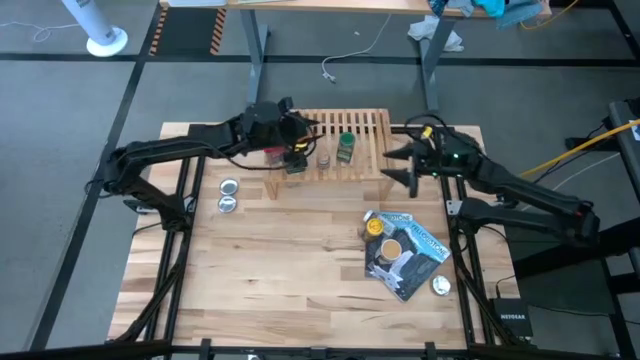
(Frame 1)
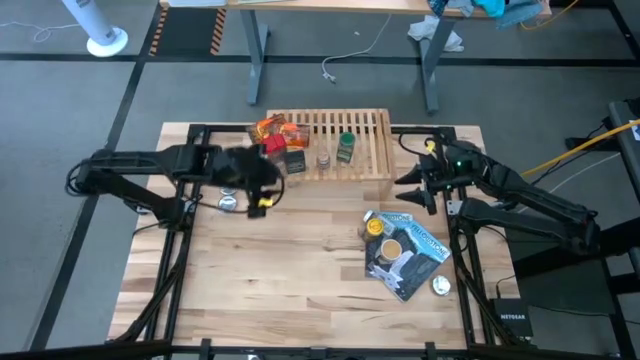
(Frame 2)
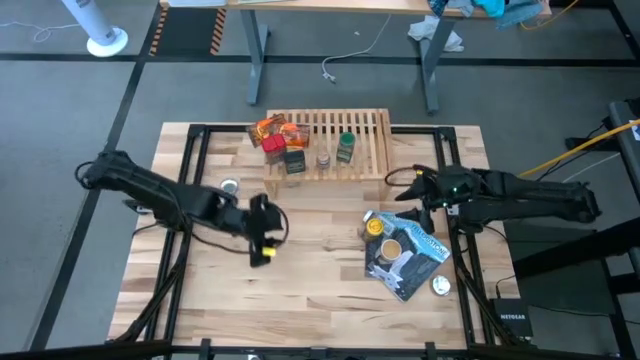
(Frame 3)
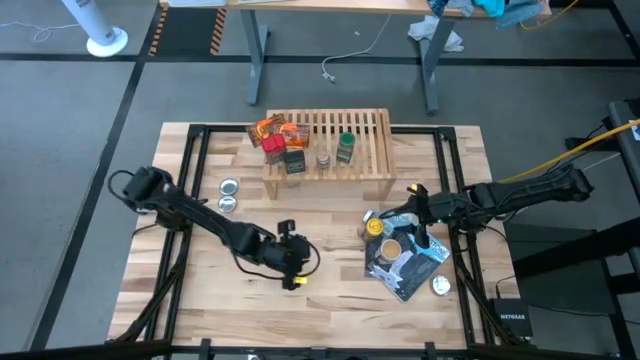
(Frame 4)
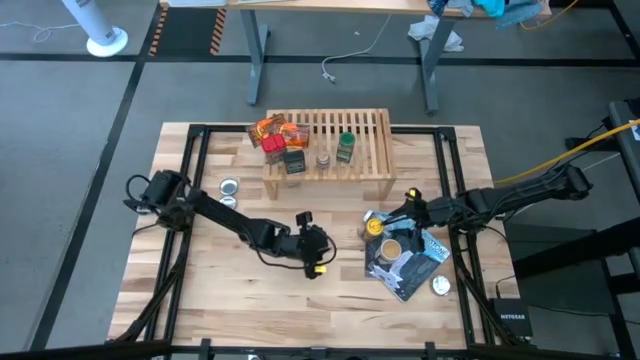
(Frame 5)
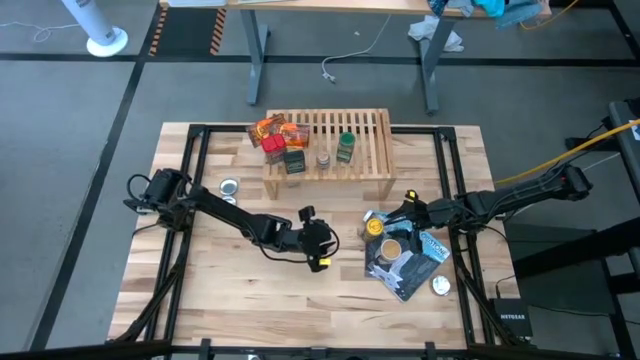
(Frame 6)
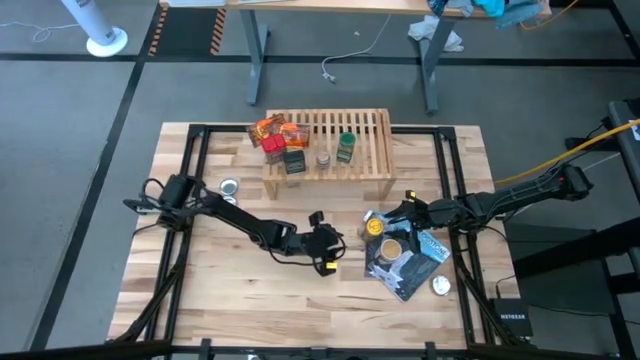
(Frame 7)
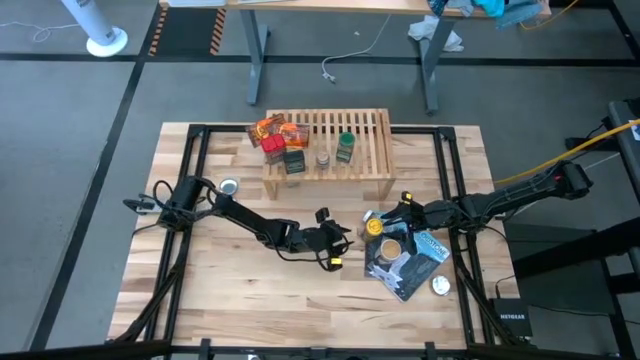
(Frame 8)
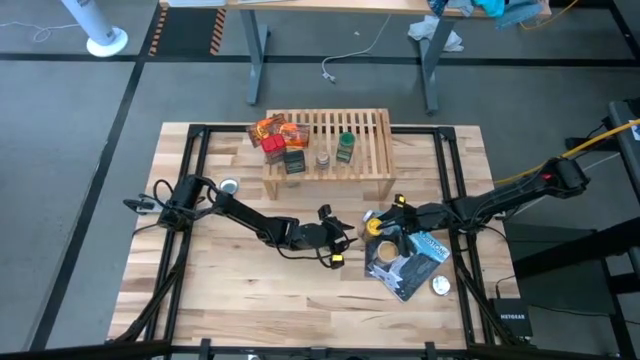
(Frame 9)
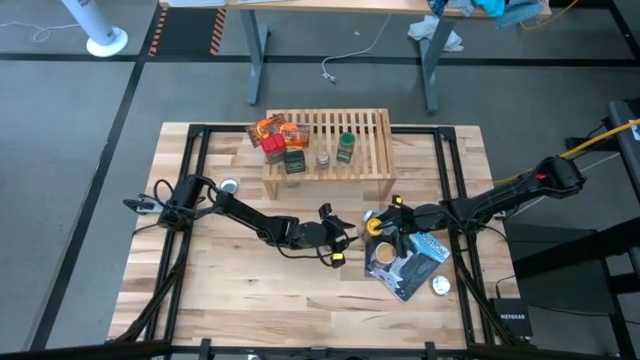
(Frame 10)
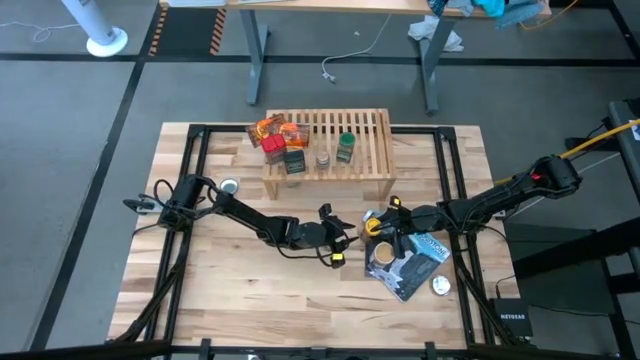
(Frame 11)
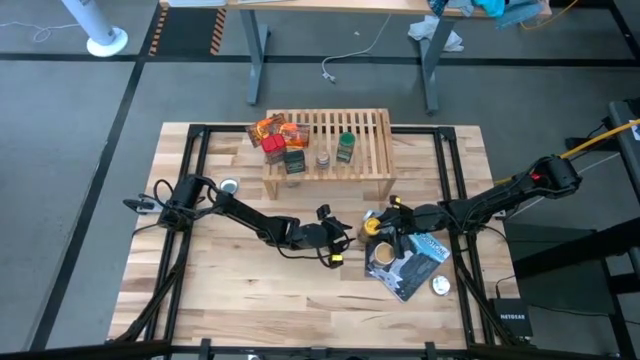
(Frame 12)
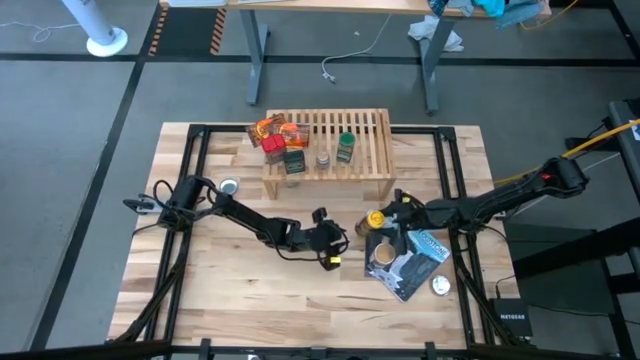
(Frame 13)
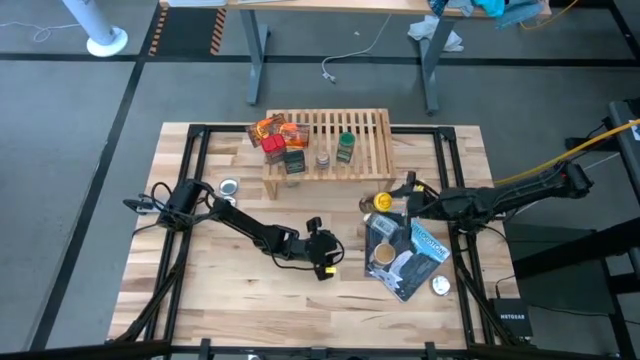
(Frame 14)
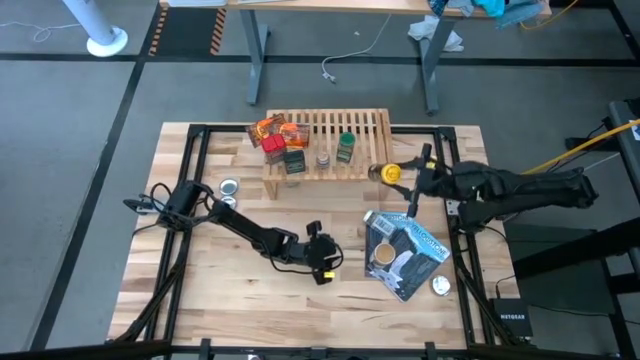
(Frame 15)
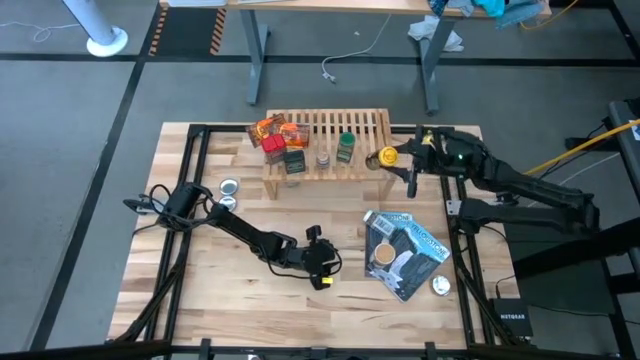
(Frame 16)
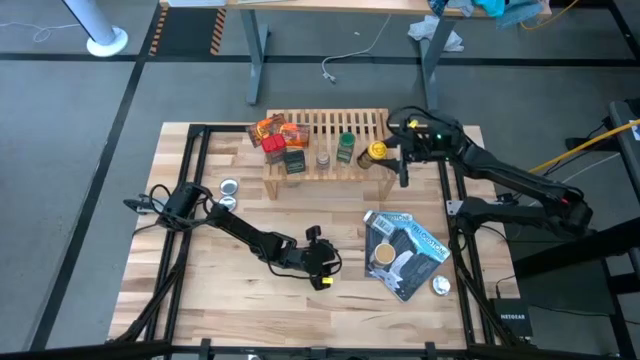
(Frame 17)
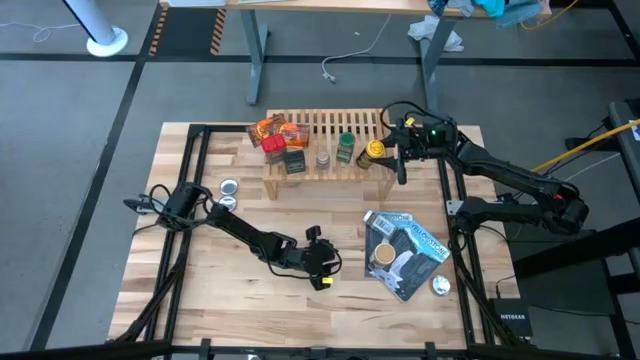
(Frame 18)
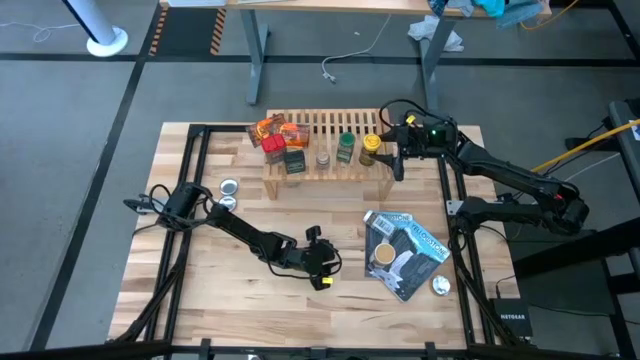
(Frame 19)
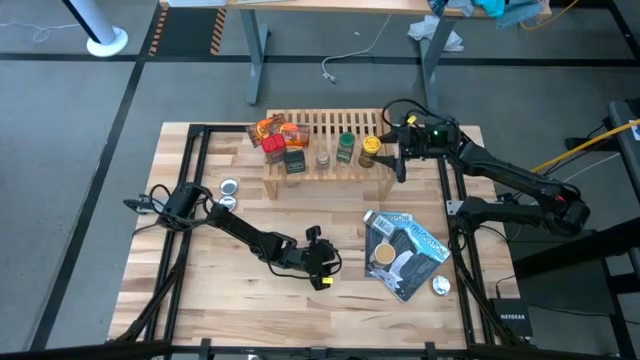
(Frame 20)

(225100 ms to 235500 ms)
Task: Shelf spices
Put the yellow seasoning bottle on the shelf

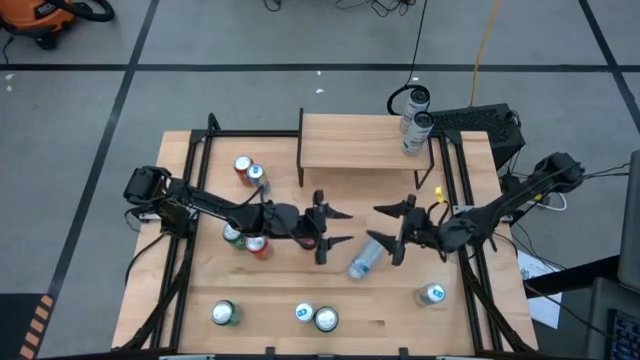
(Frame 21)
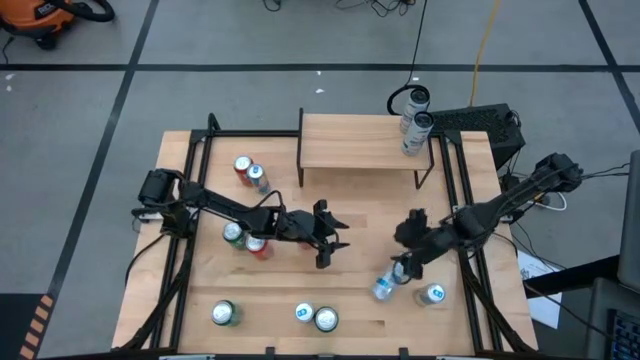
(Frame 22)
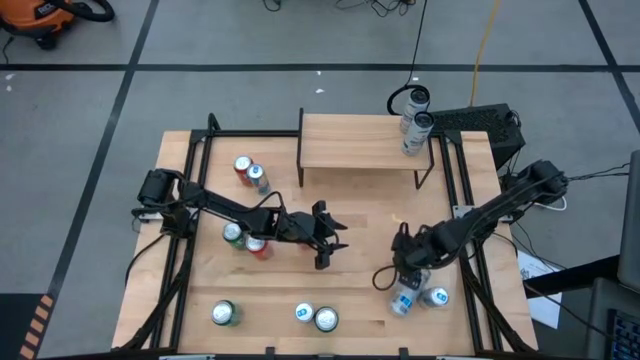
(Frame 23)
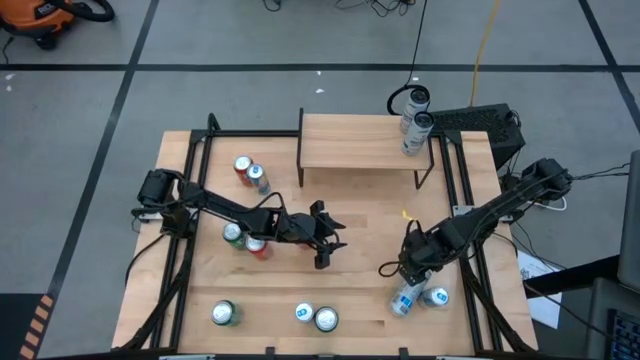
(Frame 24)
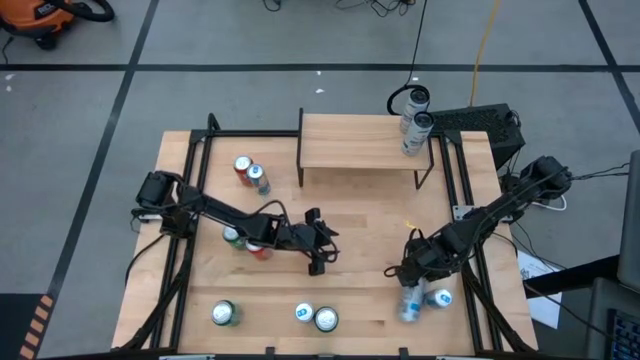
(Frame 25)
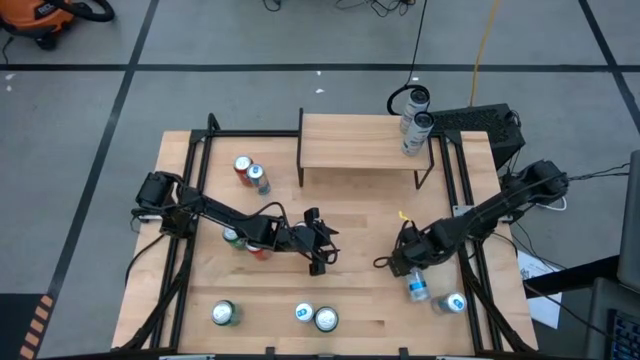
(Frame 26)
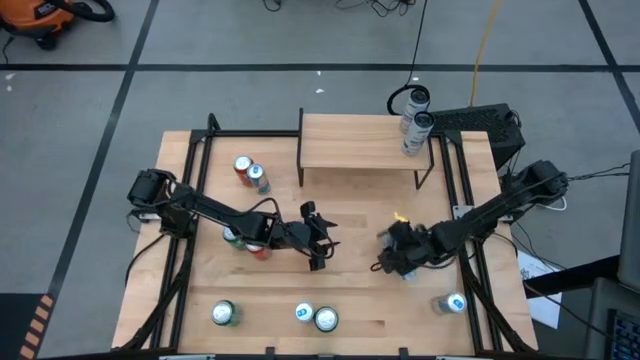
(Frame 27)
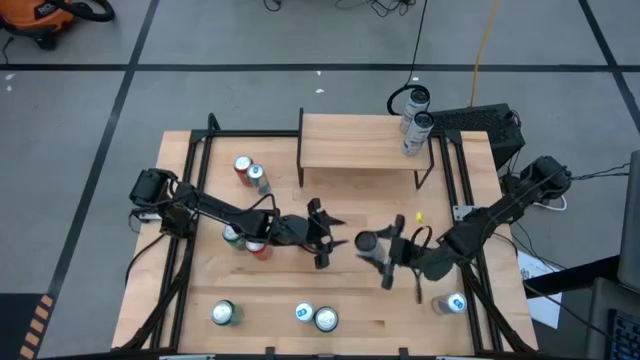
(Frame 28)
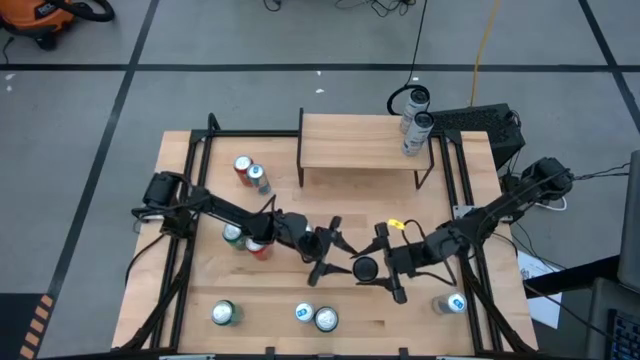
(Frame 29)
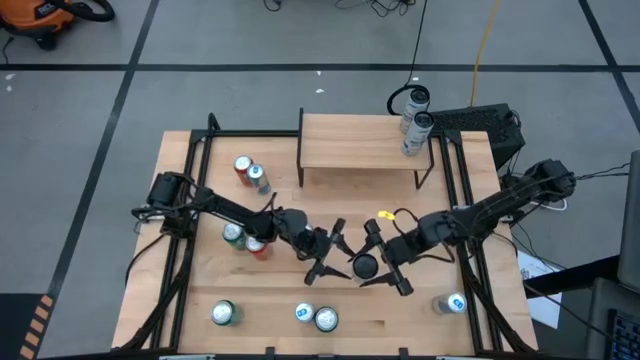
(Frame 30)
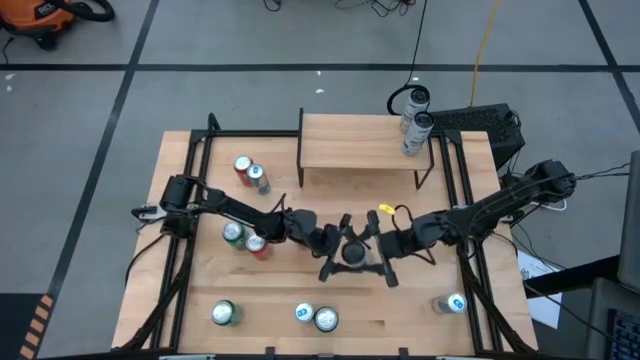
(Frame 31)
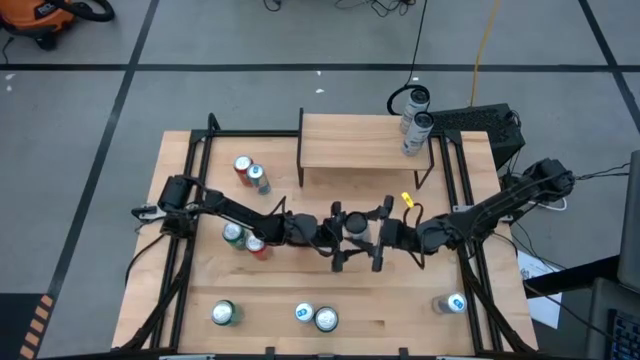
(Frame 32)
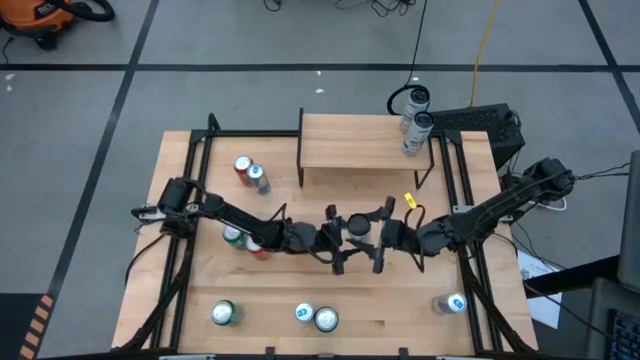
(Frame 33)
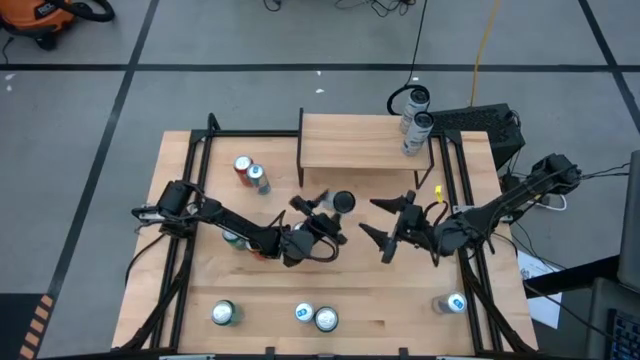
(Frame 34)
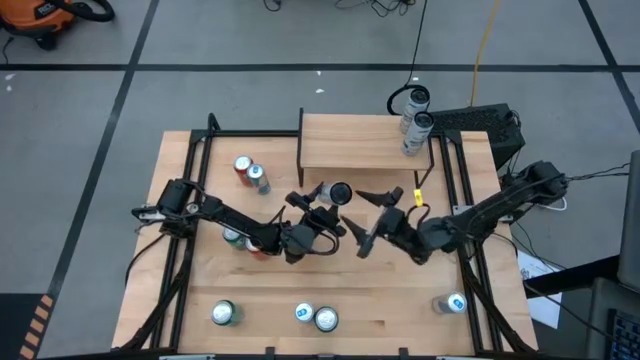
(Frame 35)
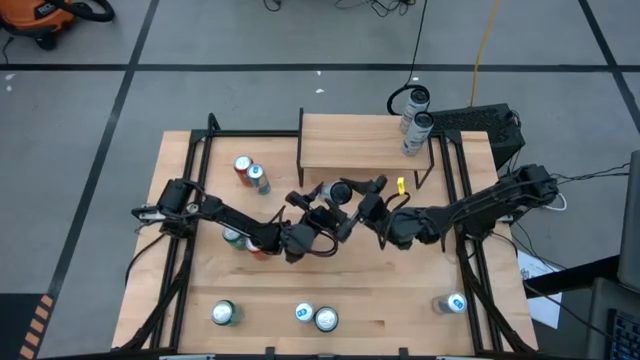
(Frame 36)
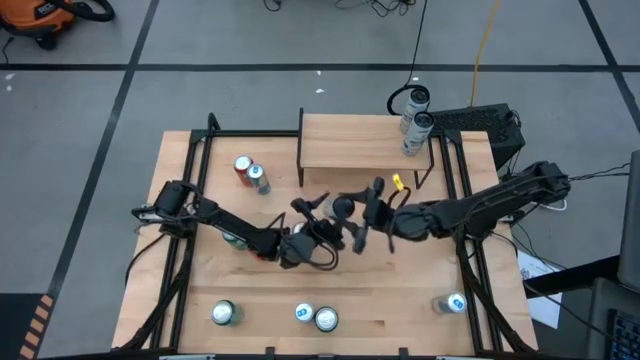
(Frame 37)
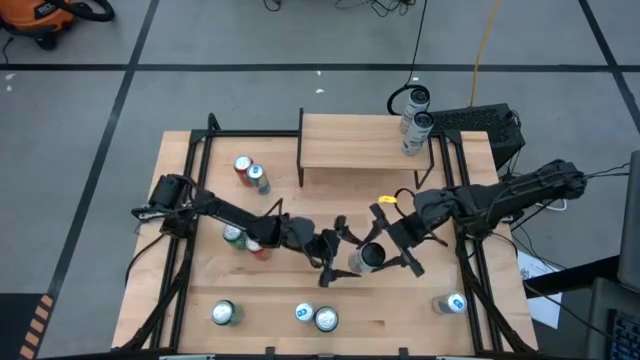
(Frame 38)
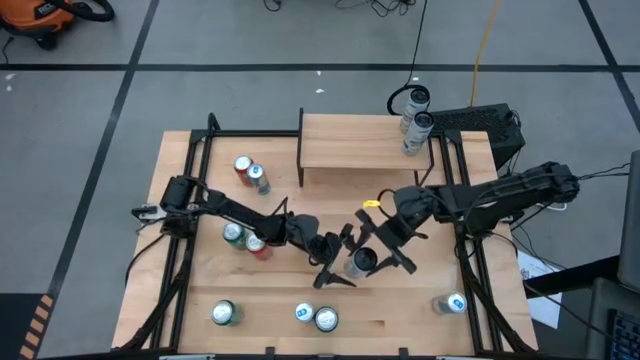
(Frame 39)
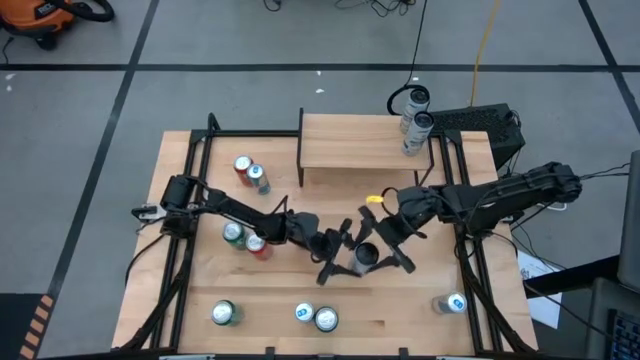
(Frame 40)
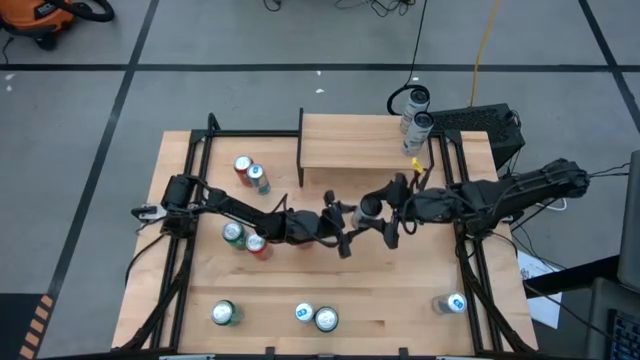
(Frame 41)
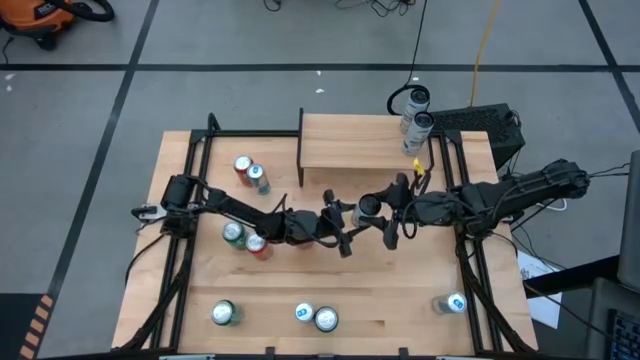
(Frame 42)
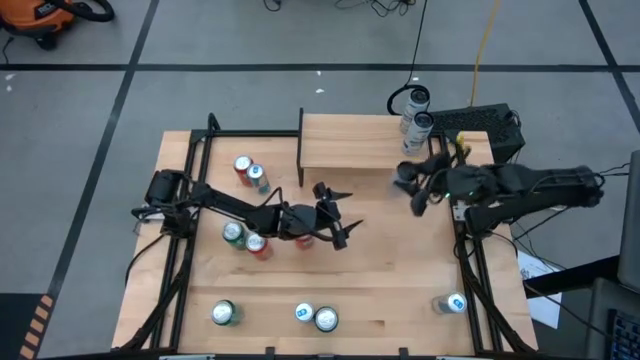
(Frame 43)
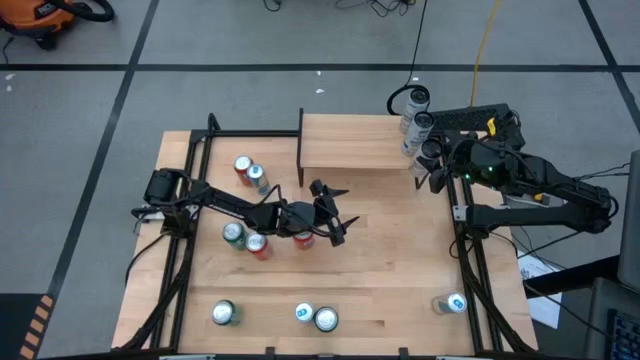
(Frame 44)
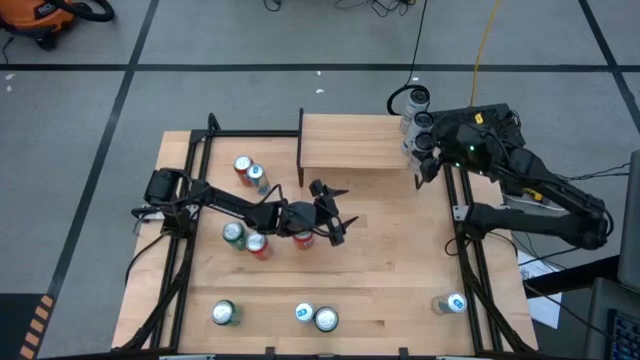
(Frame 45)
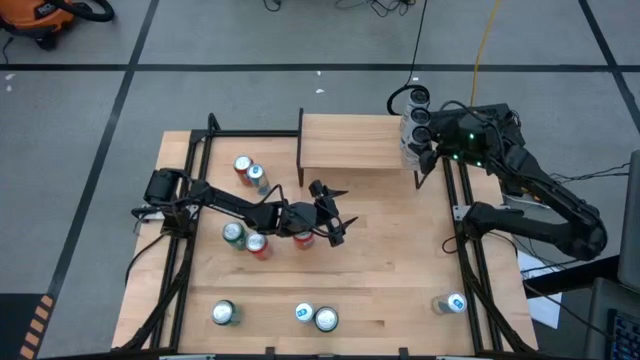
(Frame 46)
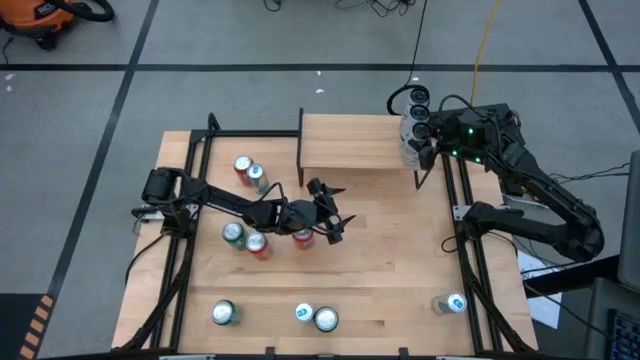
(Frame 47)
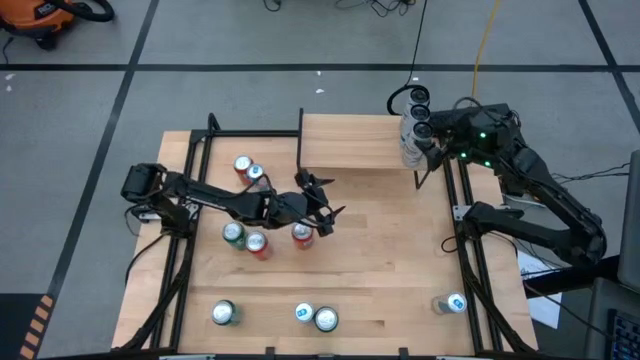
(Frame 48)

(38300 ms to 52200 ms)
Task: Place canned beverage on shelf
Put the white blue soda can on the shelf aligned with the other white blue soda can
